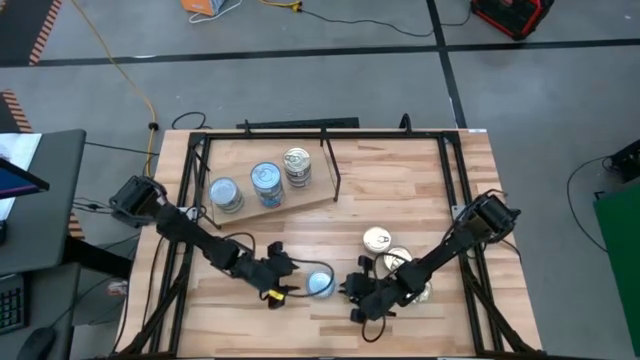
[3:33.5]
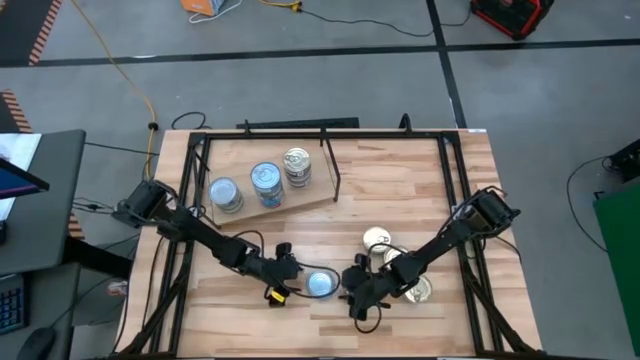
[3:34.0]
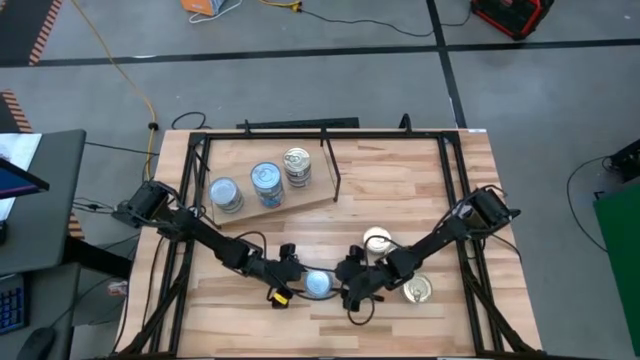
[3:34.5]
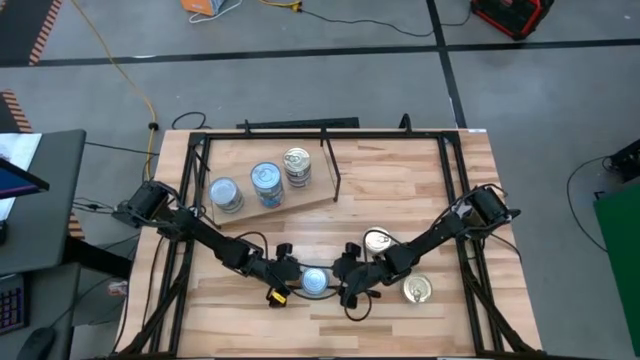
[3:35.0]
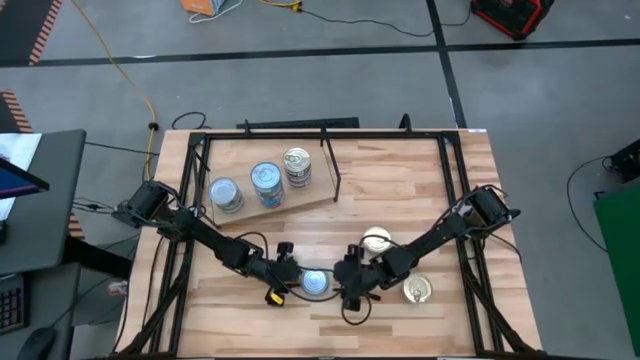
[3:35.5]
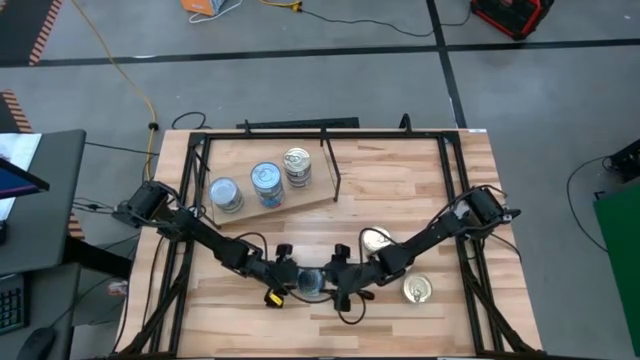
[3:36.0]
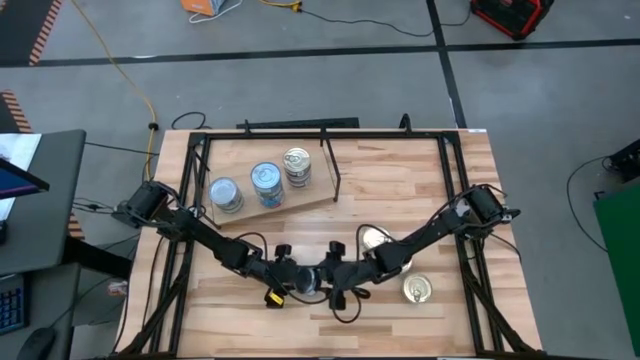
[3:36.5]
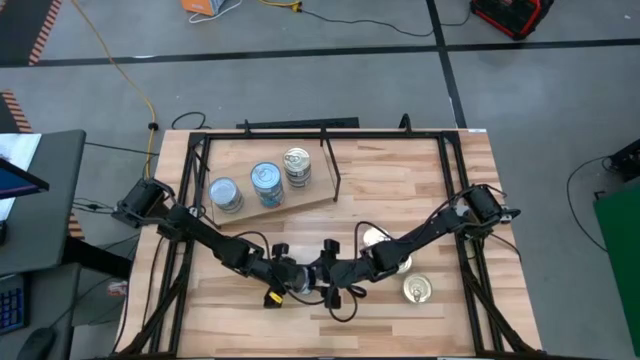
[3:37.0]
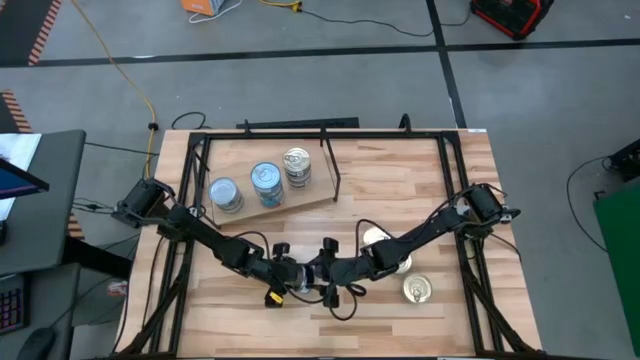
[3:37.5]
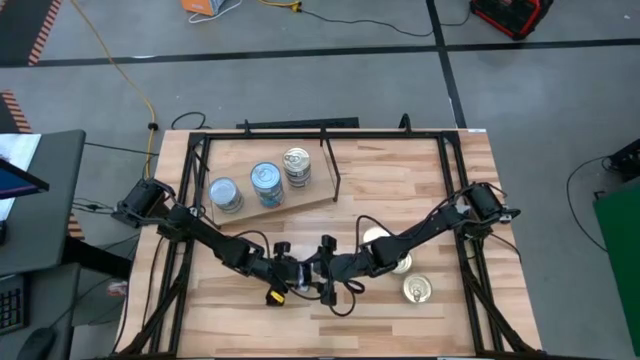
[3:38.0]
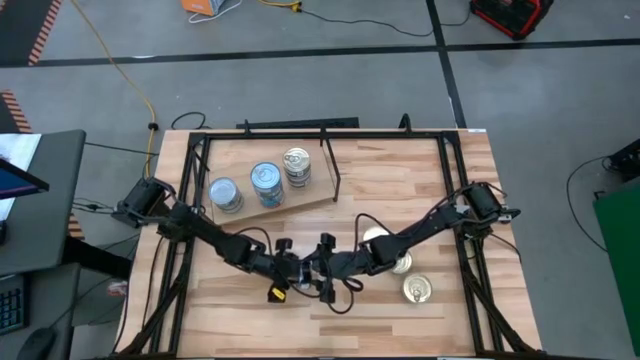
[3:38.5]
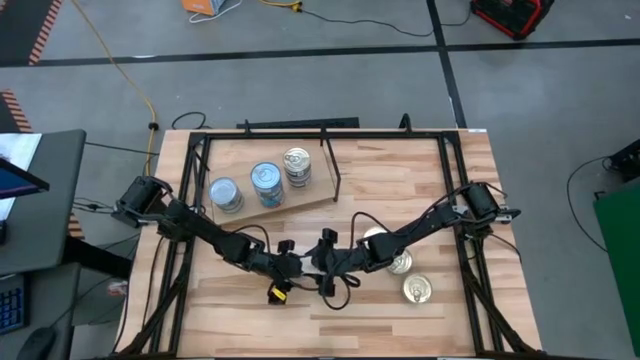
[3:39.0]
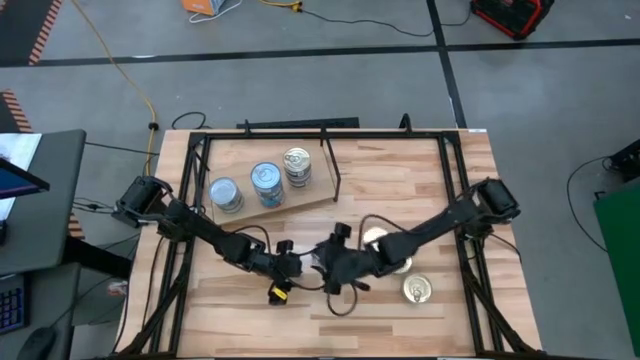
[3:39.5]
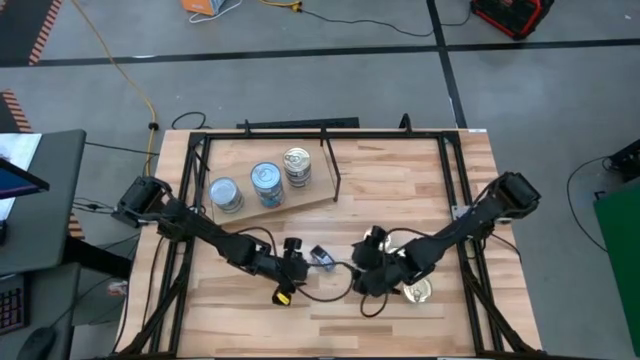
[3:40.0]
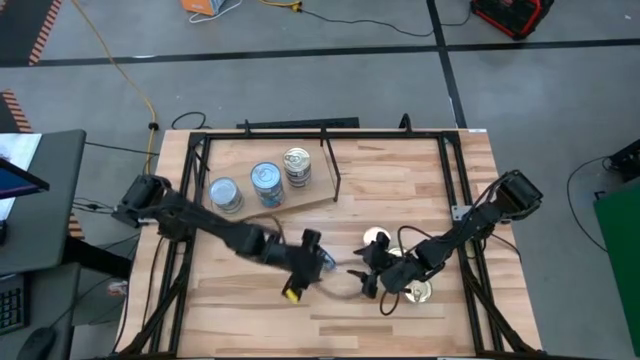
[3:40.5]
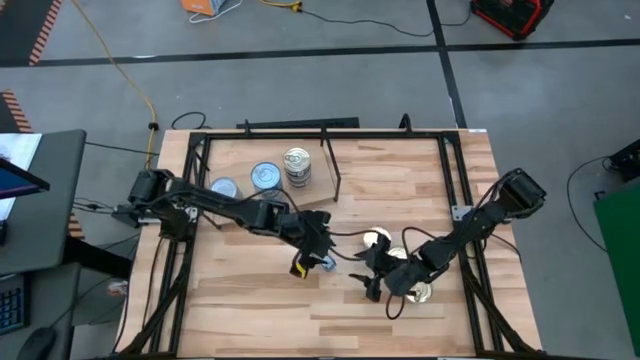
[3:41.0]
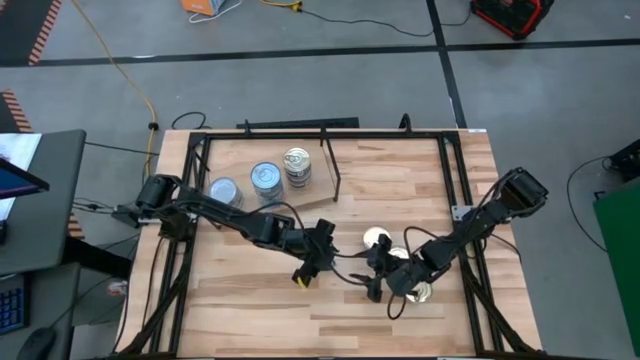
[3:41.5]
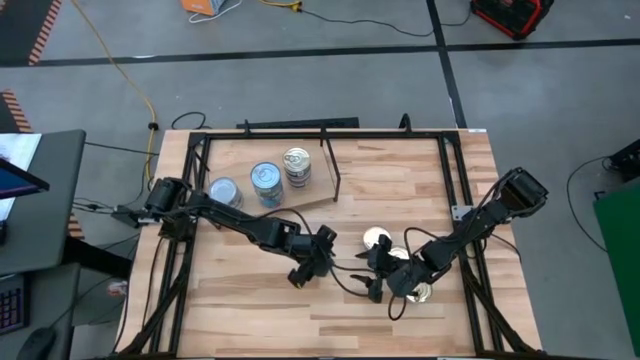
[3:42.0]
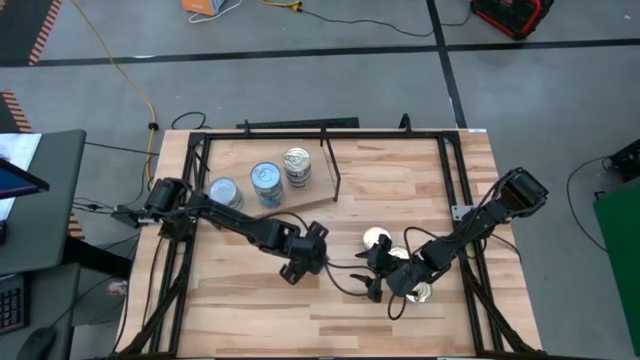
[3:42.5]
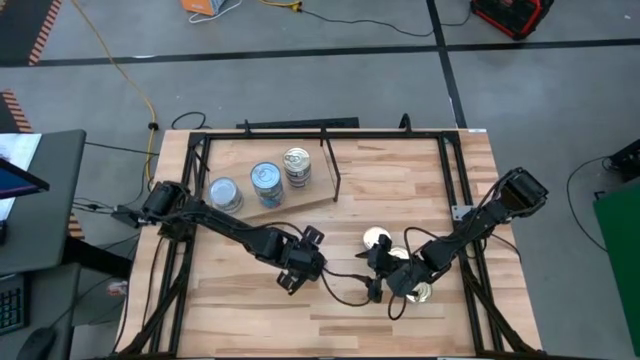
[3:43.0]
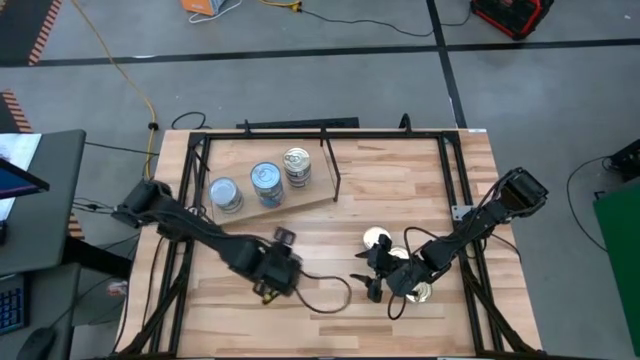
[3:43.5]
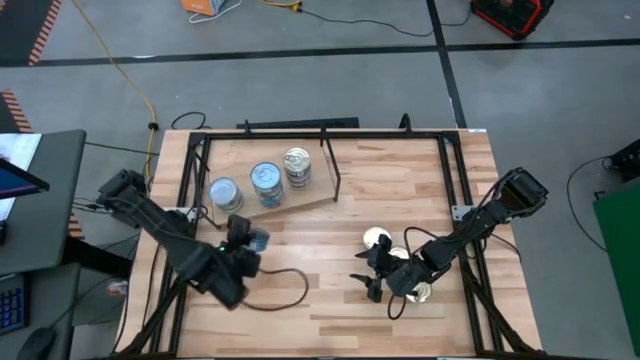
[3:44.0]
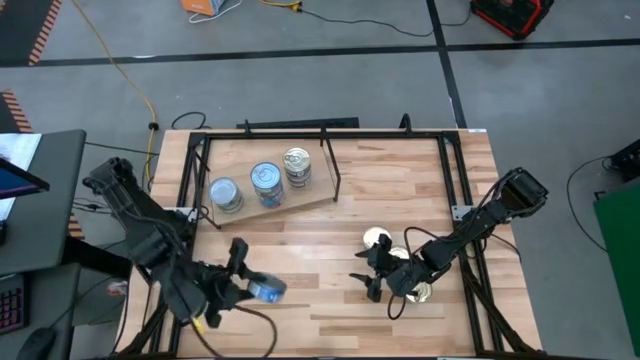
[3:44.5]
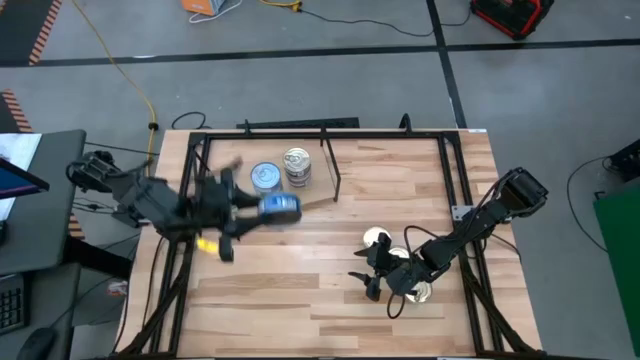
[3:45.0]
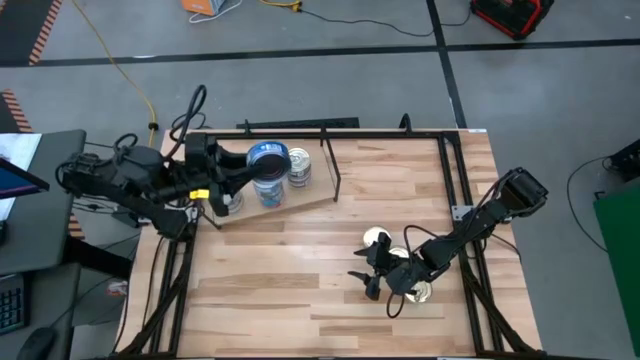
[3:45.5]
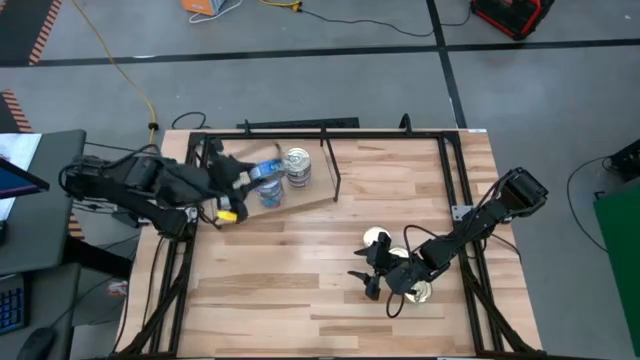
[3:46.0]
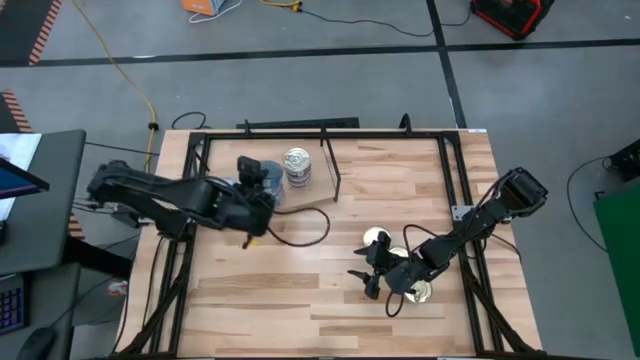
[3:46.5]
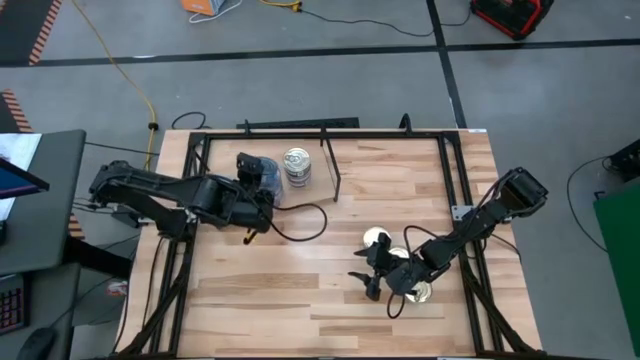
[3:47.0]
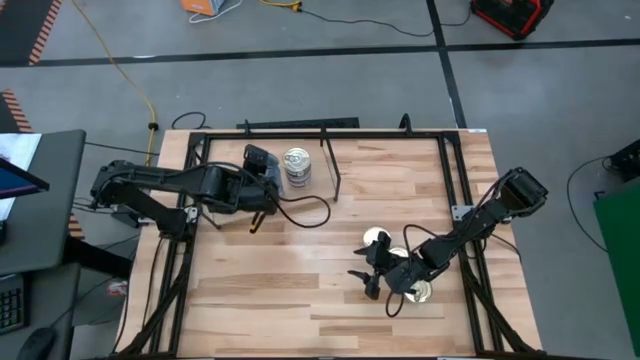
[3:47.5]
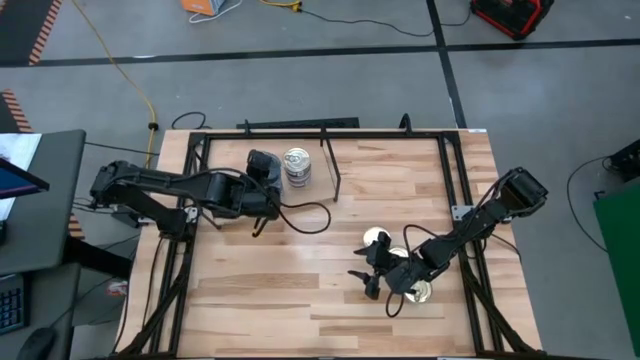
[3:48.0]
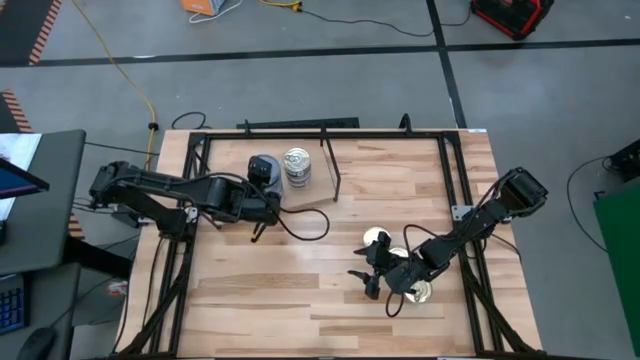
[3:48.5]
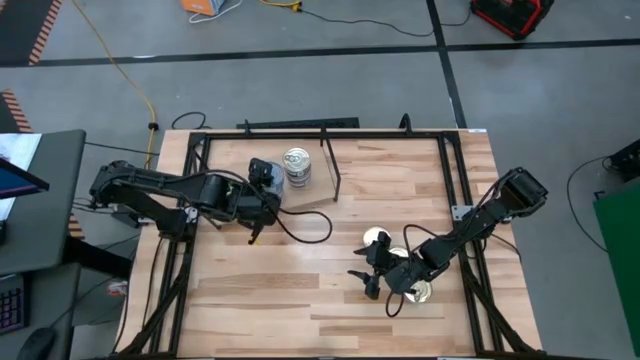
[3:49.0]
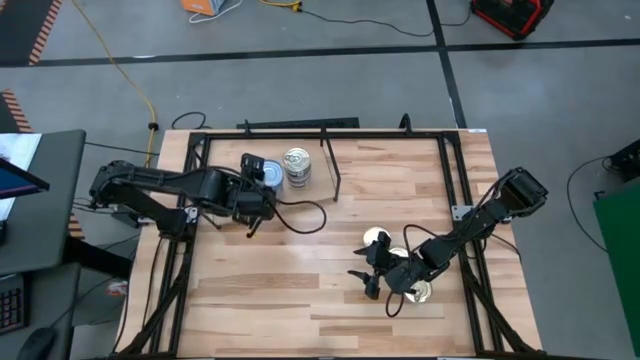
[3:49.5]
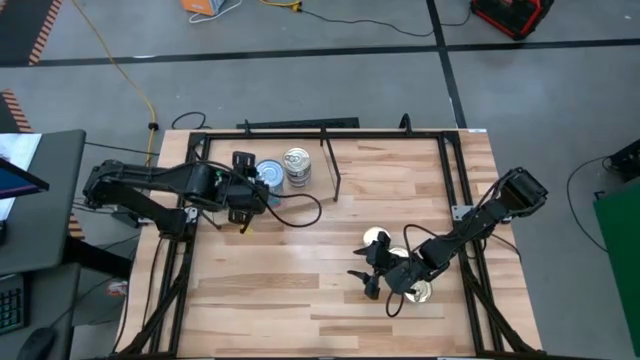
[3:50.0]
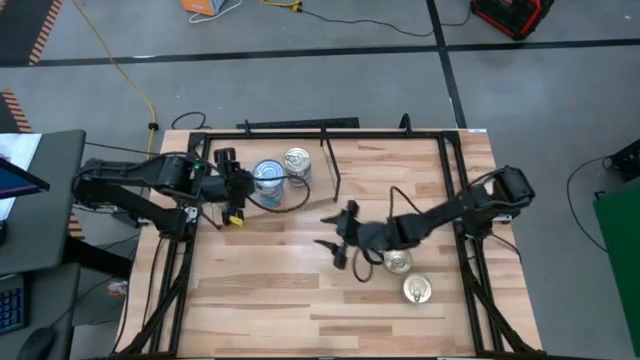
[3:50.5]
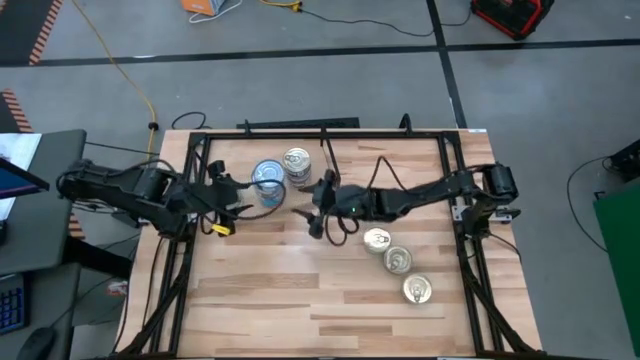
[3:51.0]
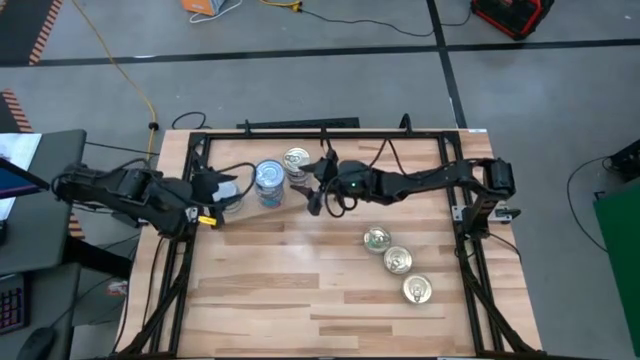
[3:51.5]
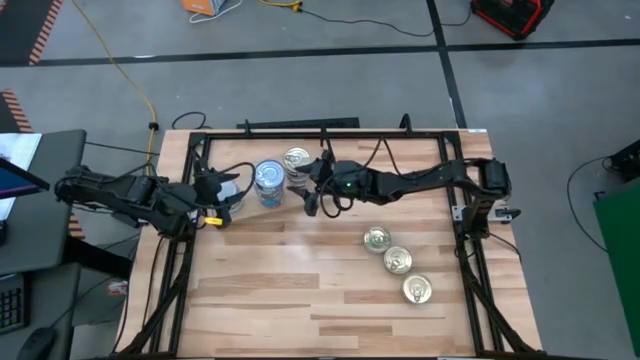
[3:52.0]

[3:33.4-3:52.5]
Task: Stack canned seafood by type on shelf
Stack the blue tuna can on top of the blue tuna can on the shelf

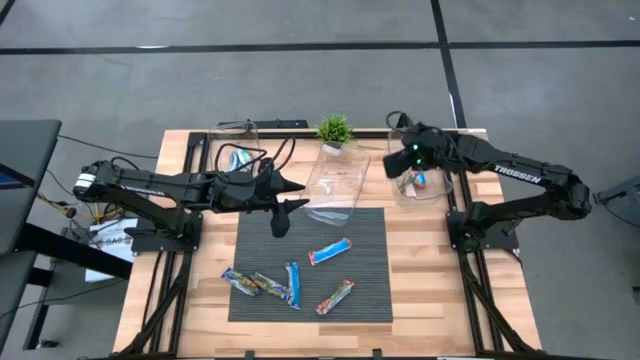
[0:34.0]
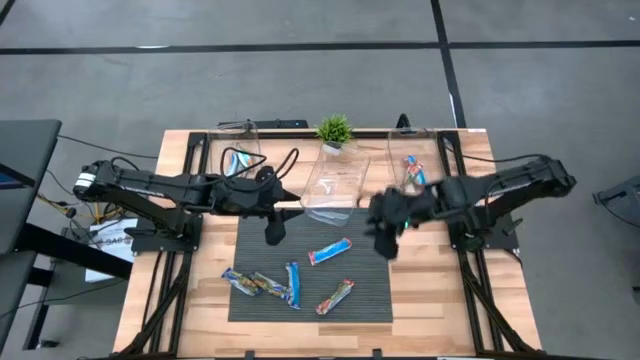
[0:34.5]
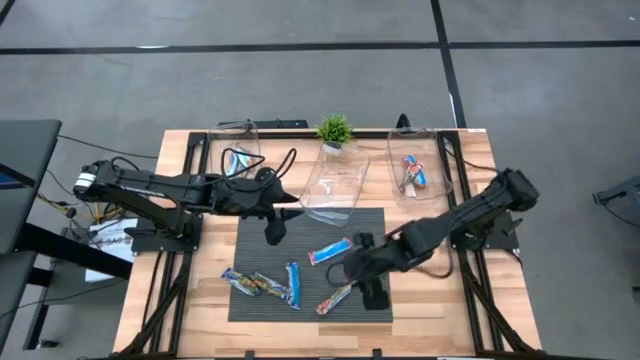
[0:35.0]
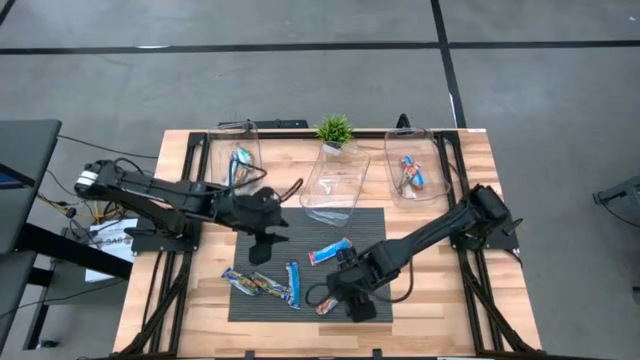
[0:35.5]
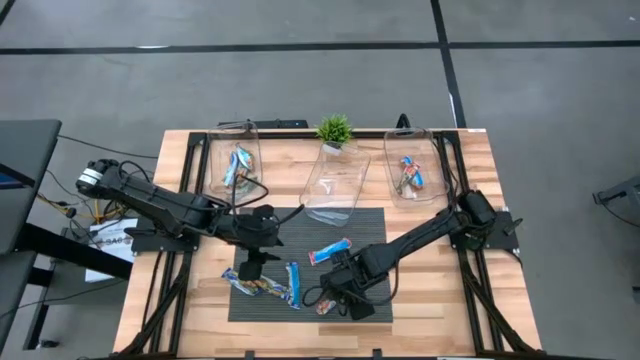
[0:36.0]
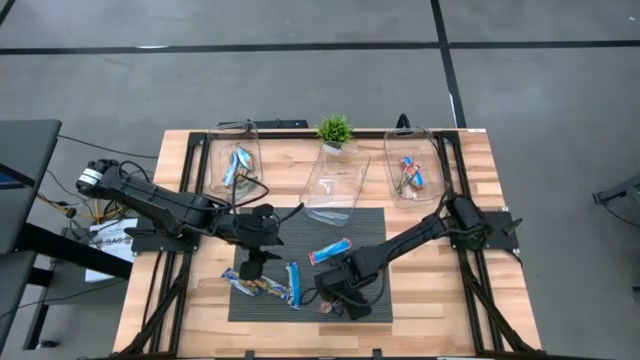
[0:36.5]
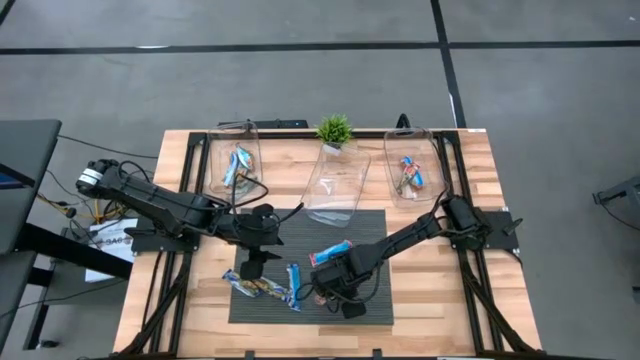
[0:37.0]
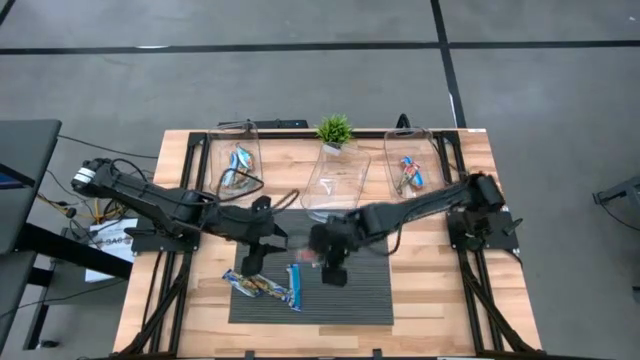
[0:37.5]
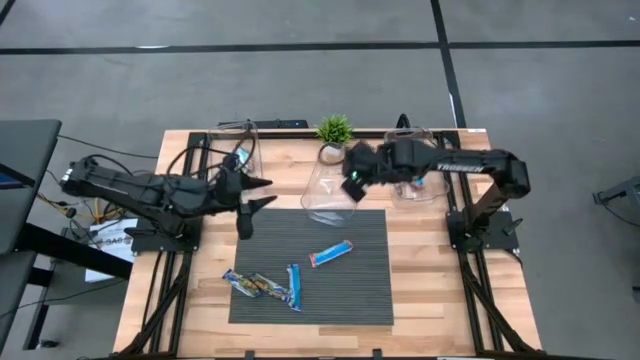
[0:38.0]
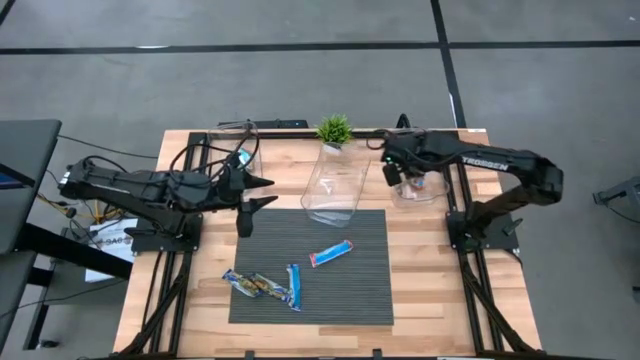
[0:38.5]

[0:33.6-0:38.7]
Task: Pick and place Granola Bars by type
Put the red granola bar into the right transparent bin
